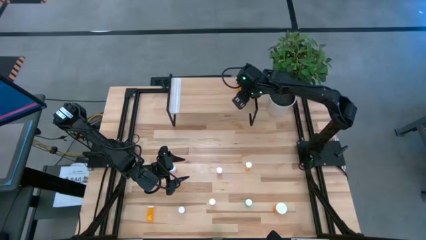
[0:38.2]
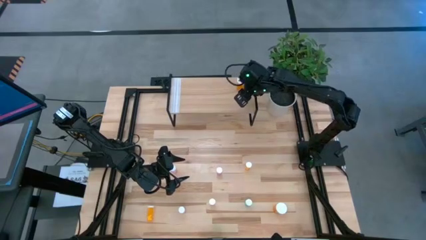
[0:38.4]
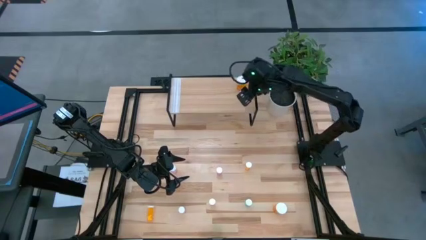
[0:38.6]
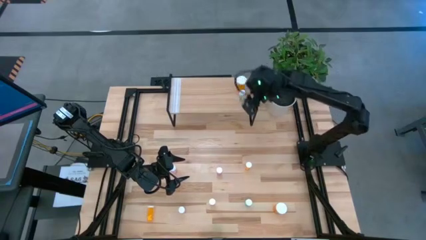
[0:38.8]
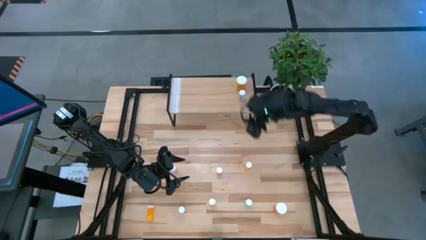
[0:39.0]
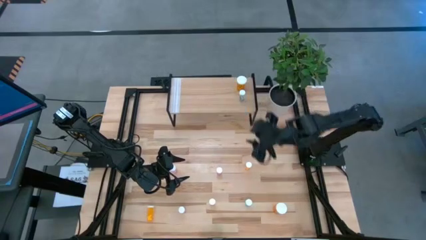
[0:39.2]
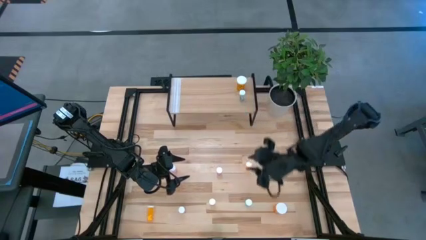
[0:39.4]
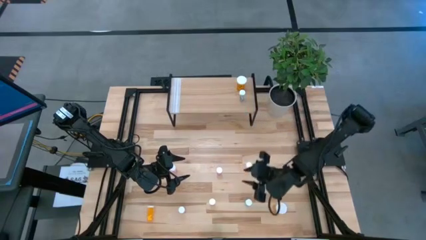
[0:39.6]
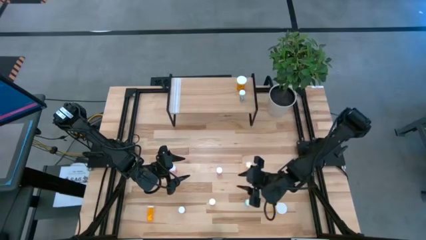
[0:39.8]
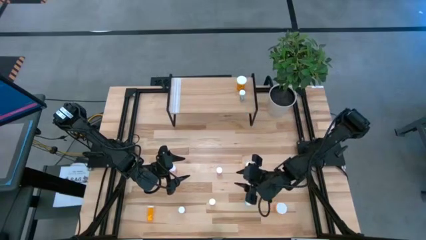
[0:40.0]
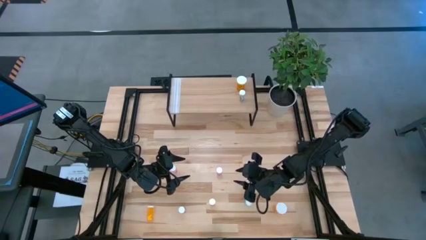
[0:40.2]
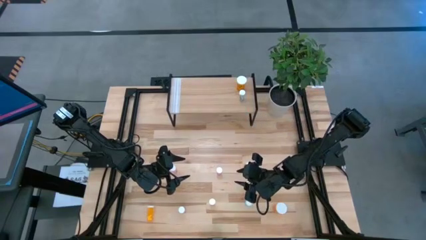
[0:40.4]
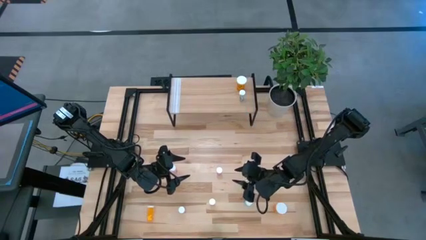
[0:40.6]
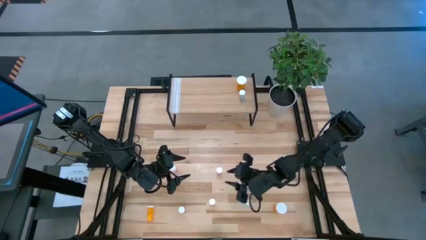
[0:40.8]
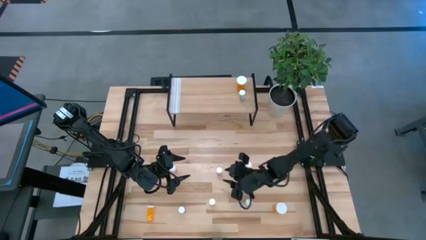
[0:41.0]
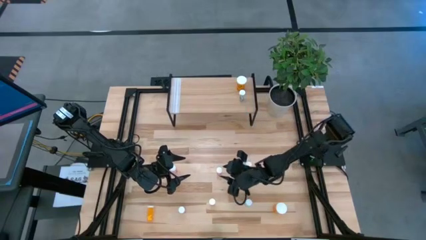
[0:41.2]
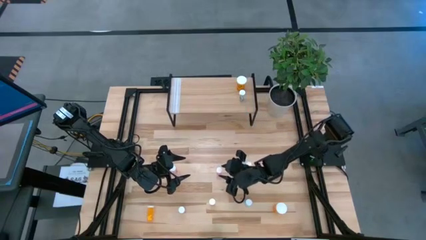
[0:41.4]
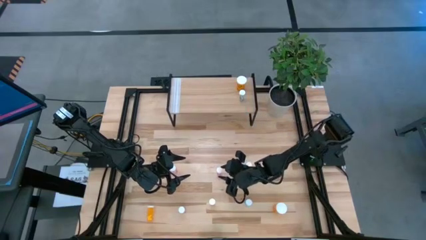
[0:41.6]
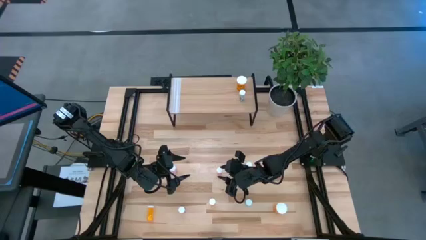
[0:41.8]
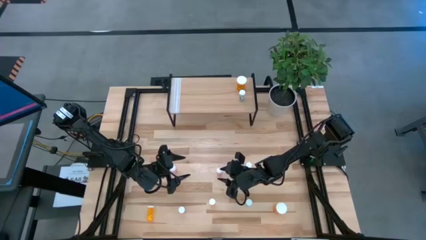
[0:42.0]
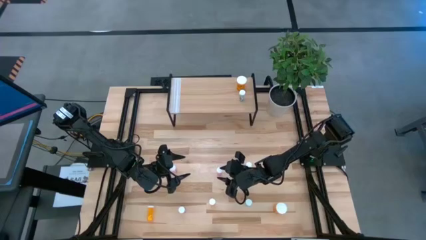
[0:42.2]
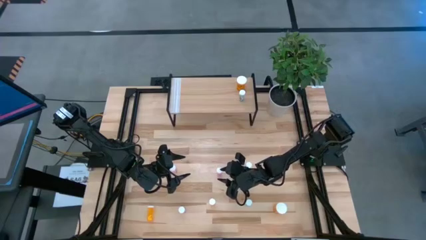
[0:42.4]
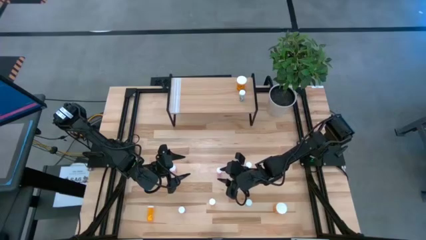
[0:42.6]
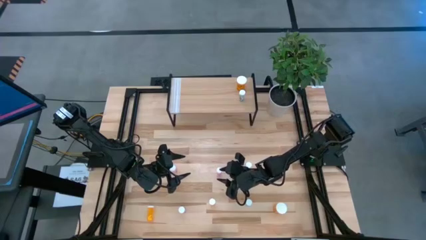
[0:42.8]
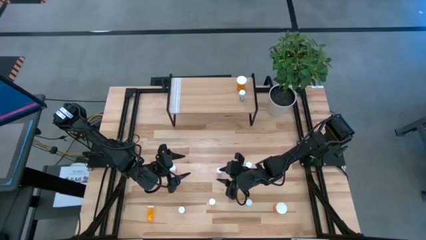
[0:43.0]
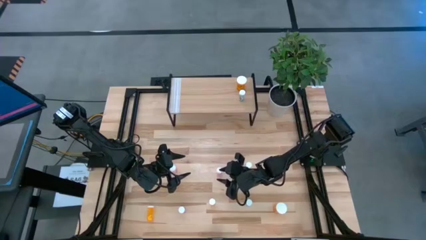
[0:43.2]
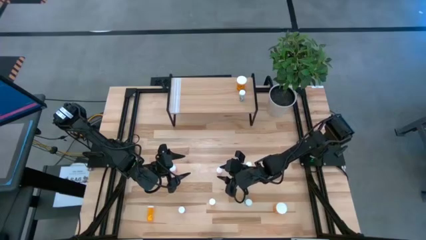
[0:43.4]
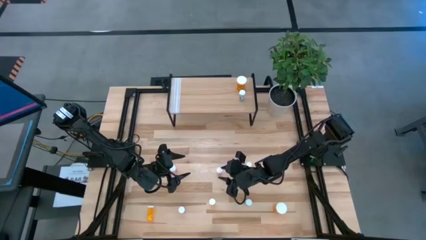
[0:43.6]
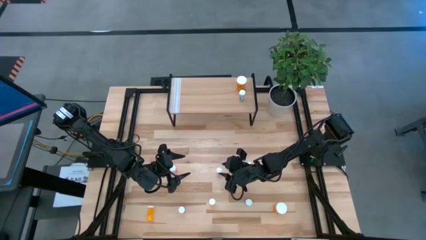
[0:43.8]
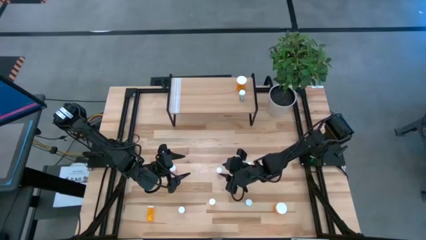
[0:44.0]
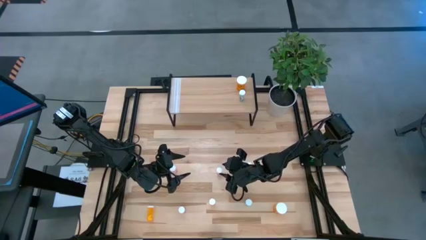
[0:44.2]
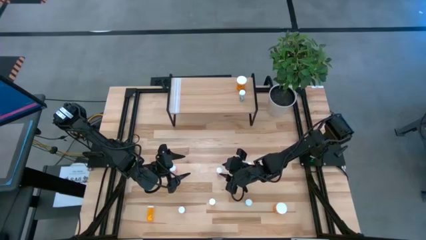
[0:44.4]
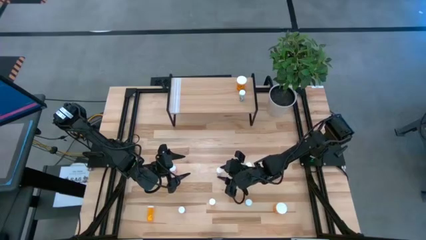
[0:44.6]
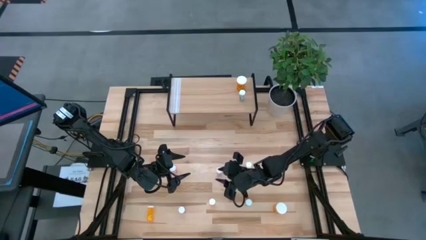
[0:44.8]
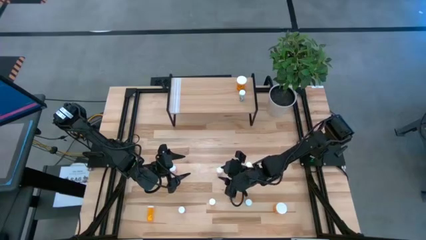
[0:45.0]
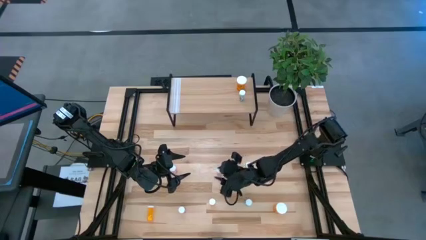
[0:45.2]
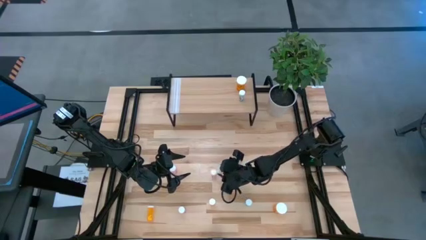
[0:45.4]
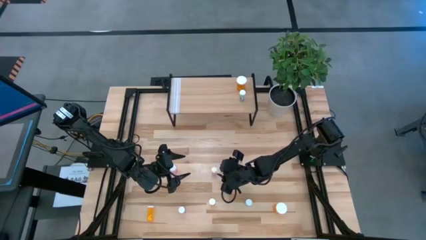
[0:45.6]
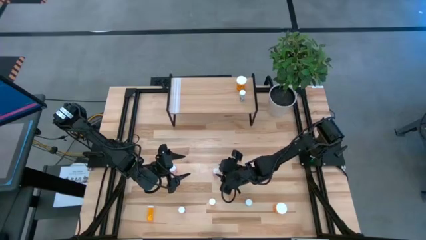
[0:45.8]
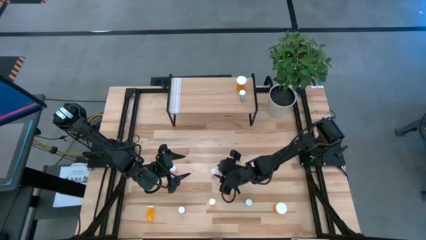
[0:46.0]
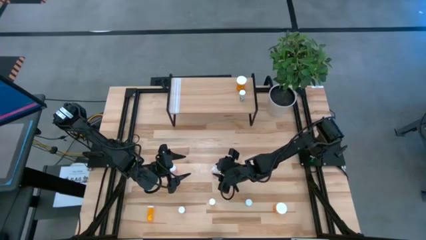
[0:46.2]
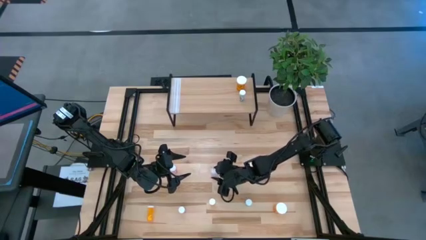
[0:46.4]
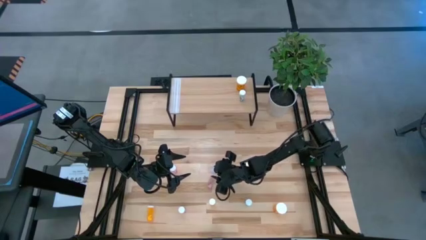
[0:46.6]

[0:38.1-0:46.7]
Task: Pick and place medicine bottles onto shelf by color
Put the top right small purple pill bottle on the shelf

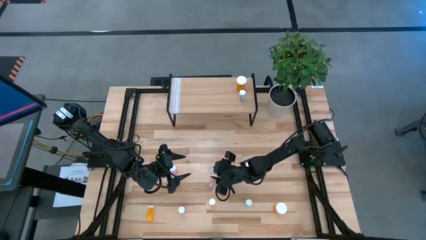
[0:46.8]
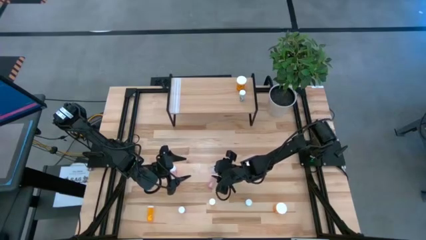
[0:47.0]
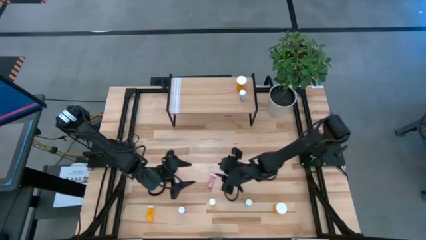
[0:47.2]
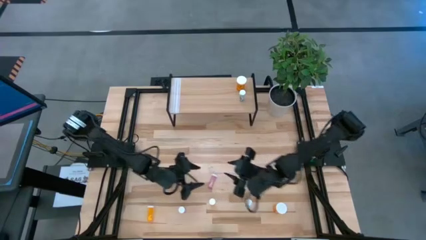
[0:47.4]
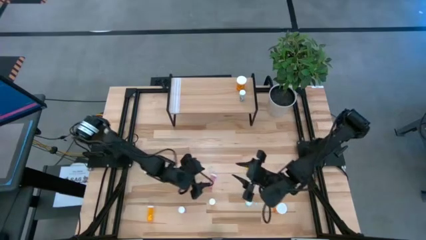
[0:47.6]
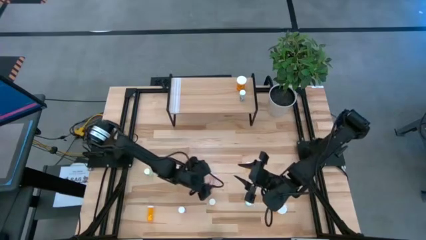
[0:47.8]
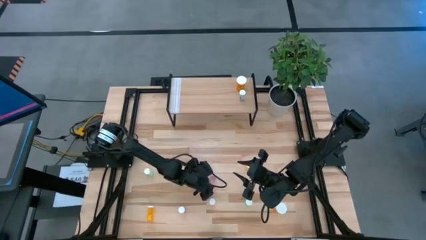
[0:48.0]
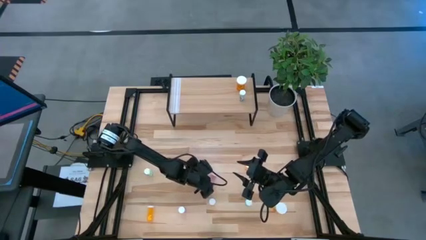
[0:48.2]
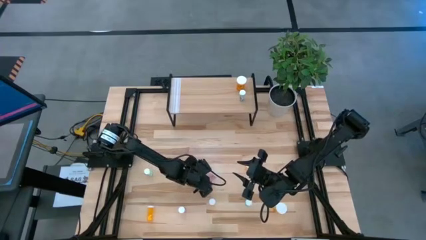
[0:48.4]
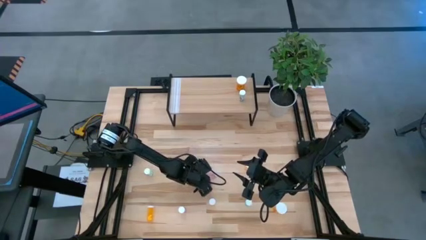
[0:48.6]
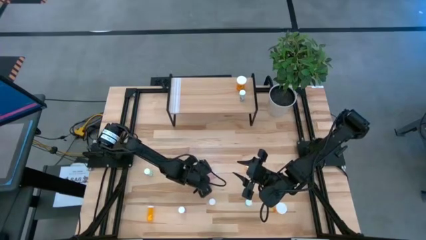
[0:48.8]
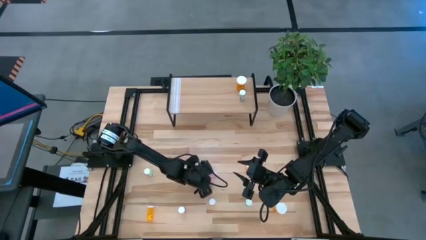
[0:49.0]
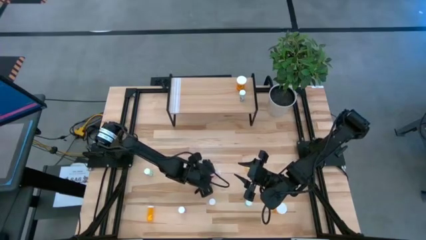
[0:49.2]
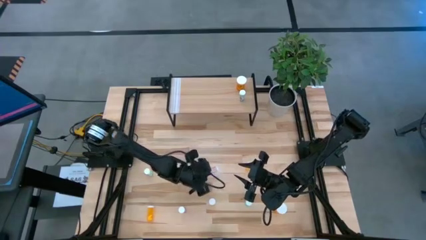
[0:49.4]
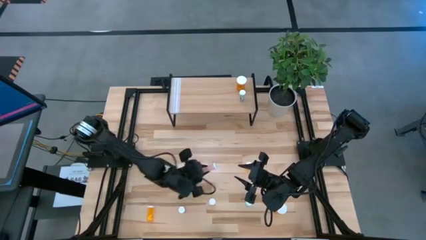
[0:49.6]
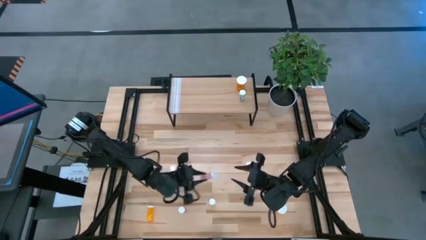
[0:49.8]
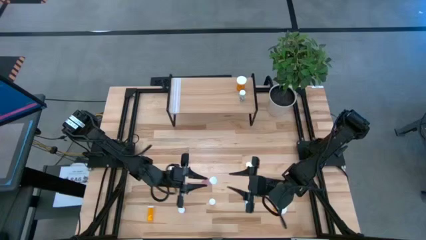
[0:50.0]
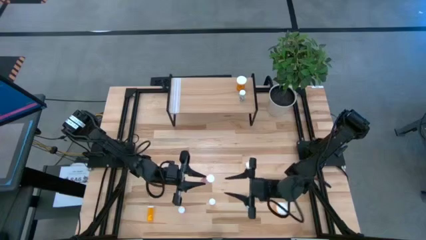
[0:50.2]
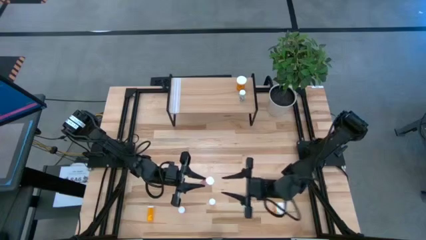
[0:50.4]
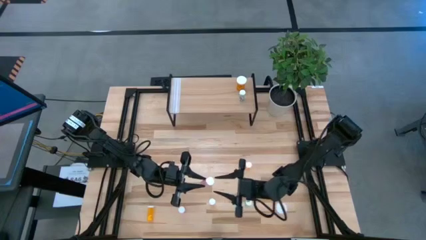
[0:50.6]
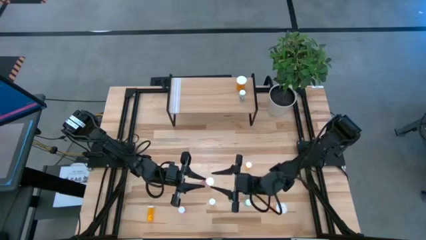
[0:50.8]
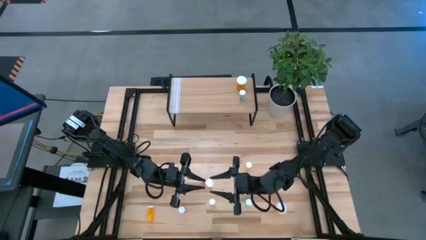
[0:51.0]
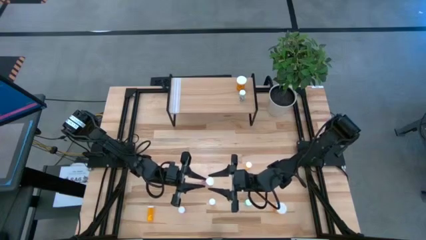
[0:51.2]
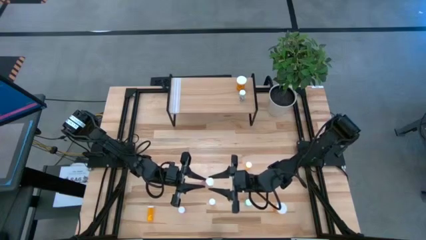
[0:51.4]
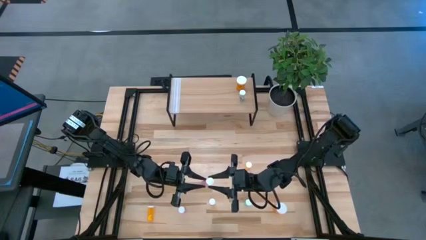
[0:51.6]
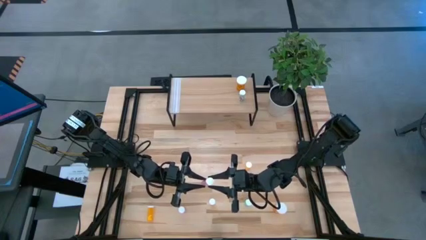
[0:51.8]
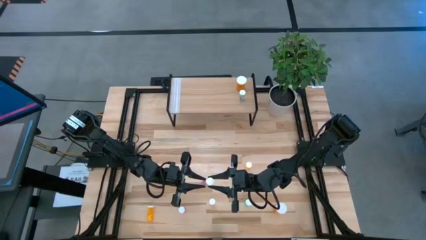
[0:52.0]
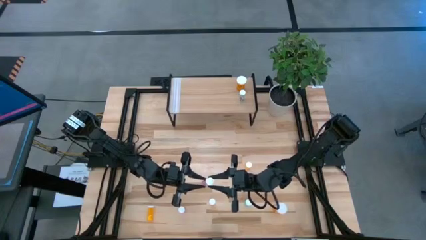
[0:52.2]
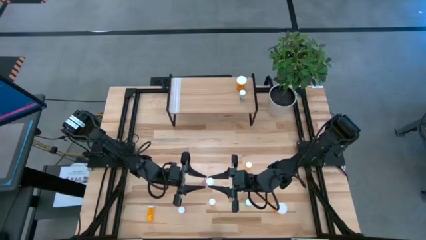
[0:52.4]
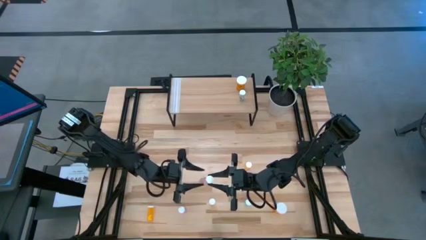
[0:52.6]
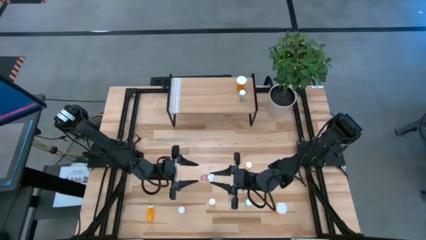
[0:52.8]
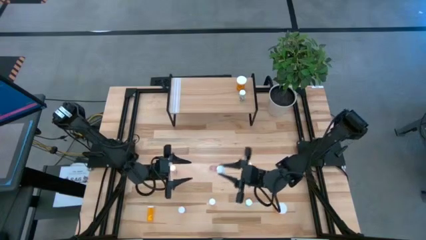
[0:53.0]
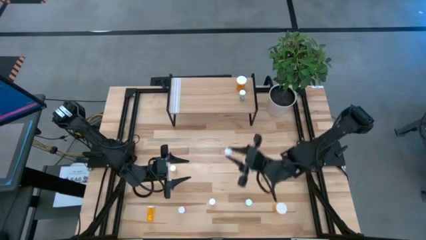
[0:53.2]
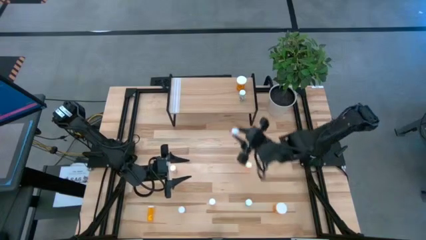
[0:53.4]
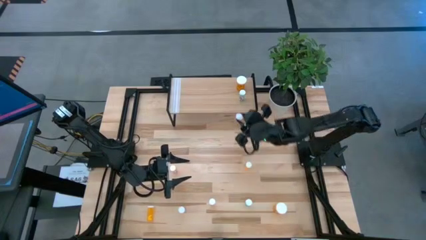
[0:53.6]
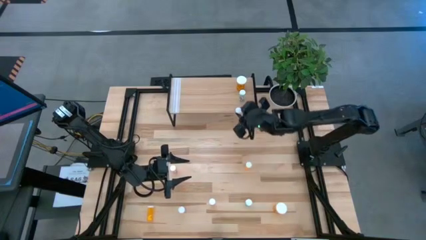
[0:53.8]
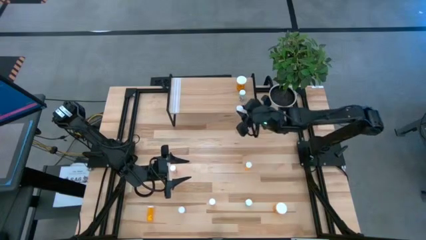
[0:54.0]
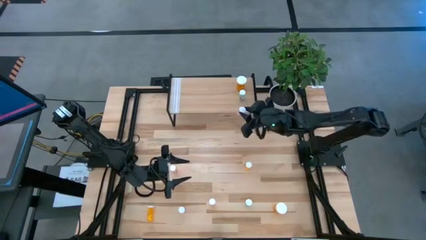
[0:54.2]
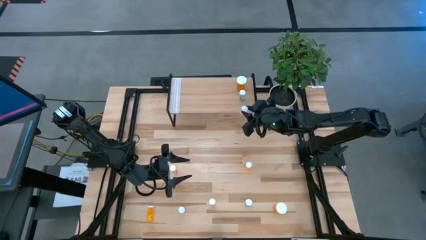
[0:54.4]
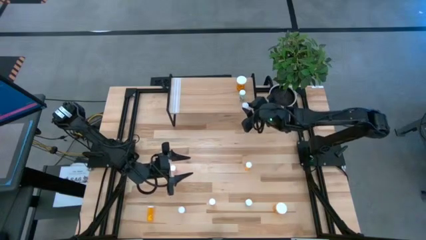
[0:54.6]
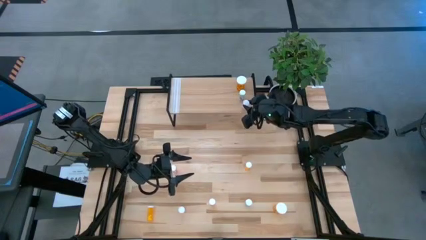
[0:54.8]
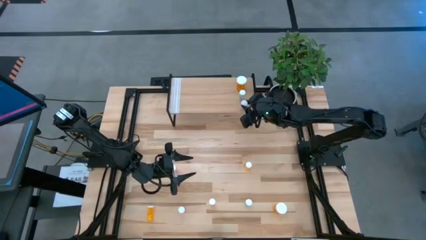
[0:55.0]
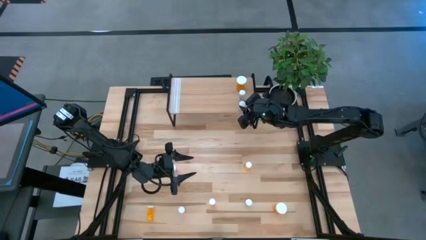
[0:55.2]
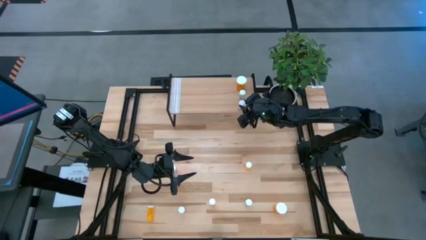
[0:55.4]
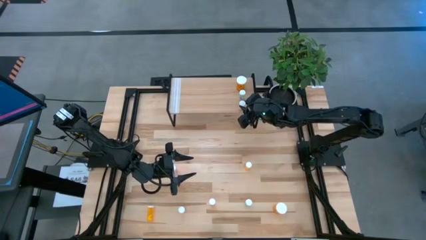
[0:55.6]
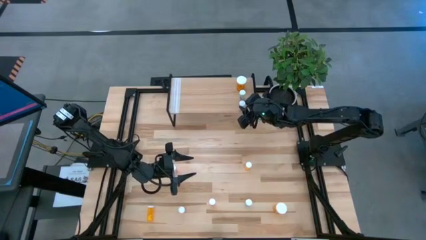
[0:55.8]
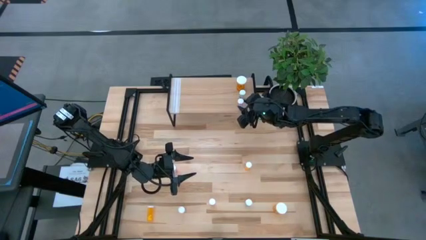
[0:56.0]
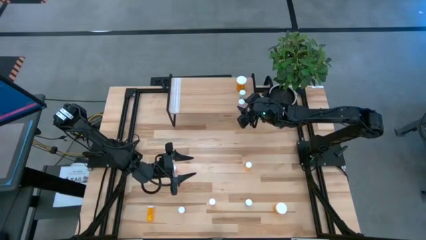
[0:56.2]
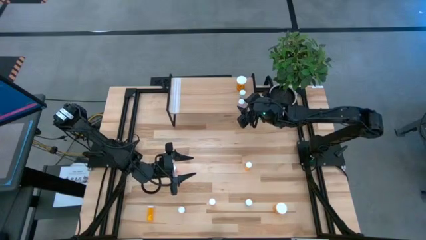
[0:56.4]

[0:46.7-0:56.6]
Put the top right small purple pill bottle on the shelf
